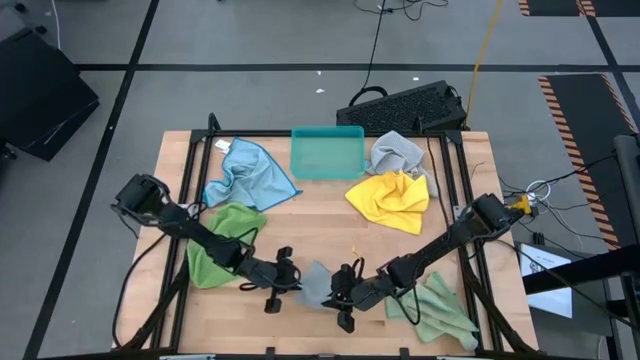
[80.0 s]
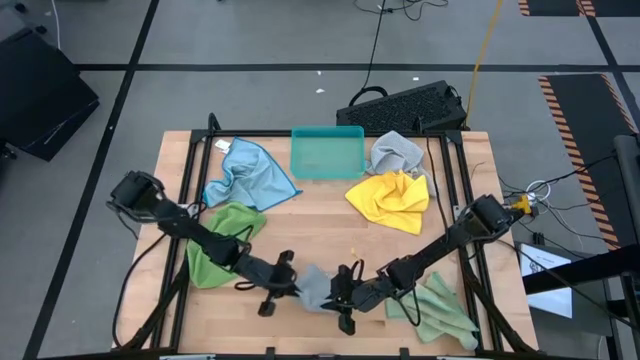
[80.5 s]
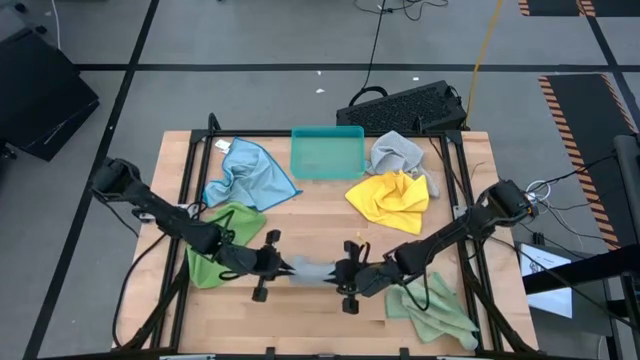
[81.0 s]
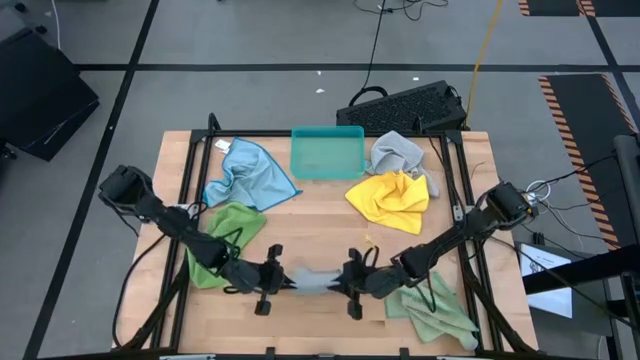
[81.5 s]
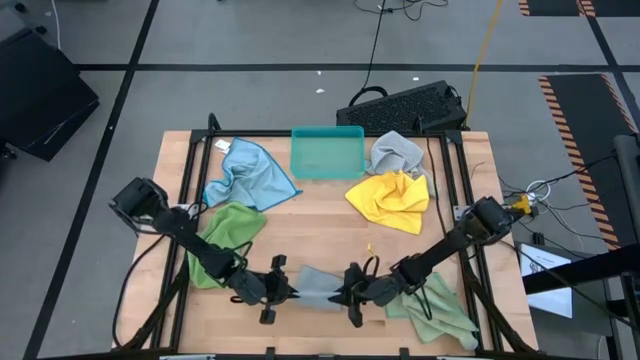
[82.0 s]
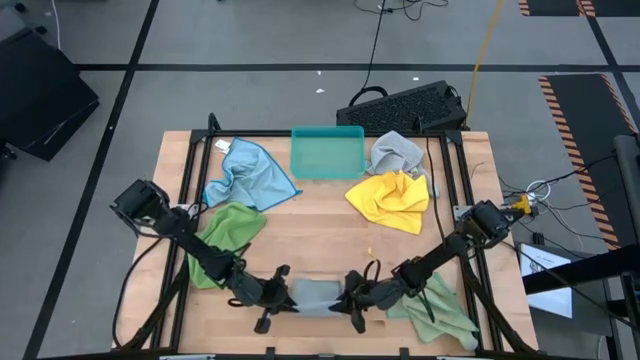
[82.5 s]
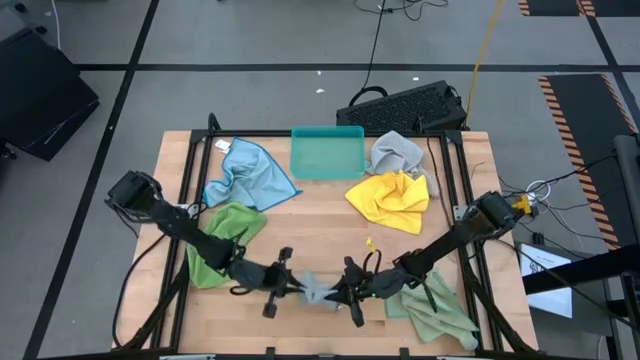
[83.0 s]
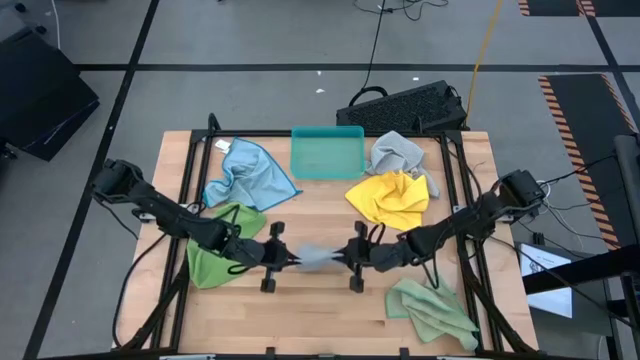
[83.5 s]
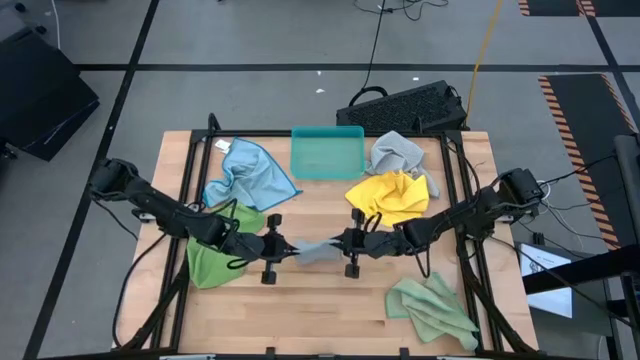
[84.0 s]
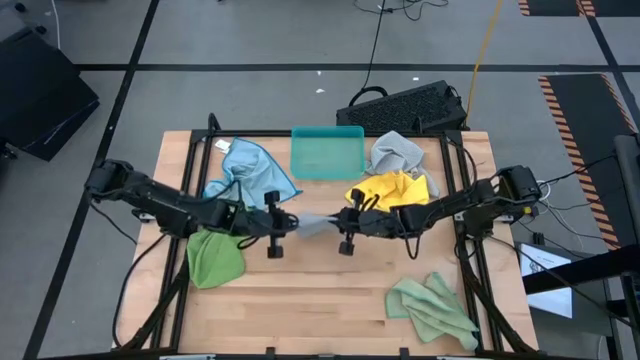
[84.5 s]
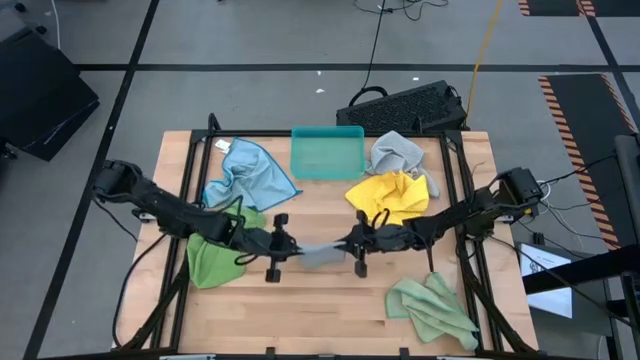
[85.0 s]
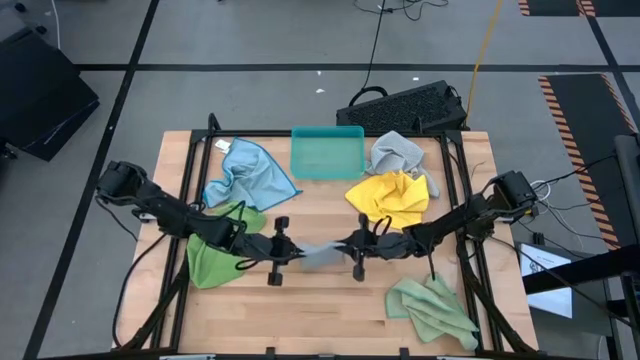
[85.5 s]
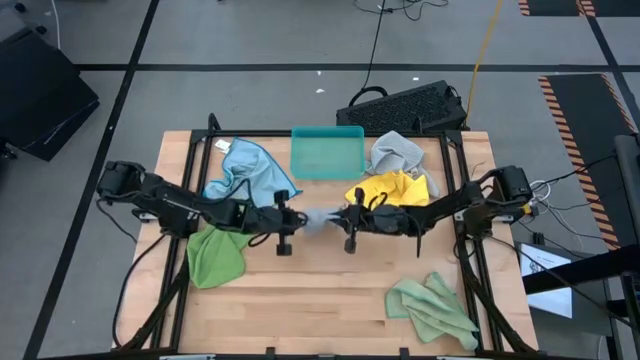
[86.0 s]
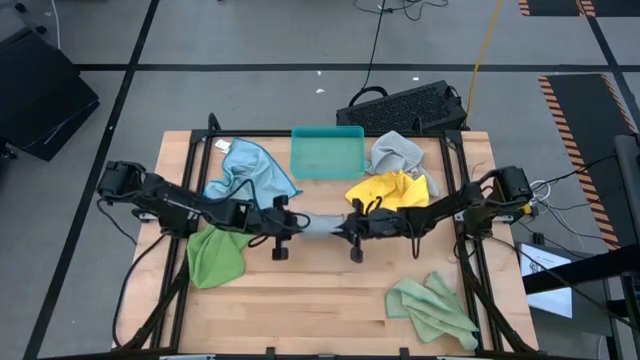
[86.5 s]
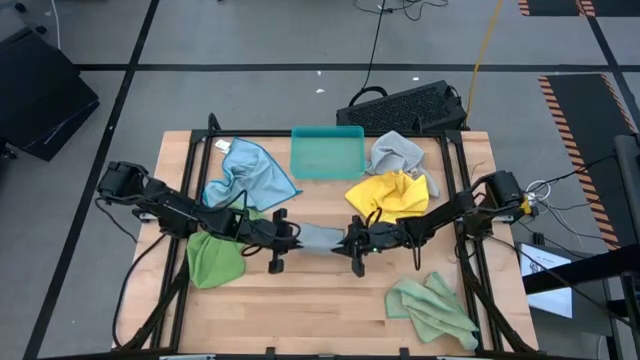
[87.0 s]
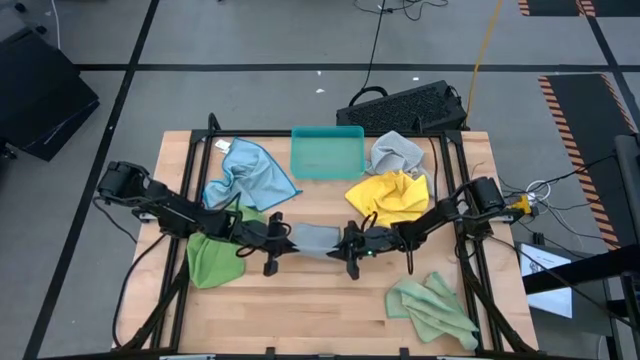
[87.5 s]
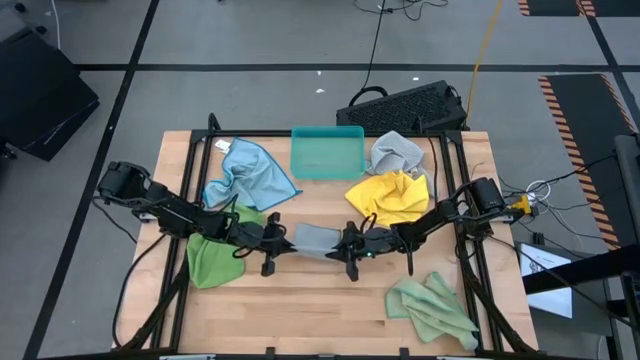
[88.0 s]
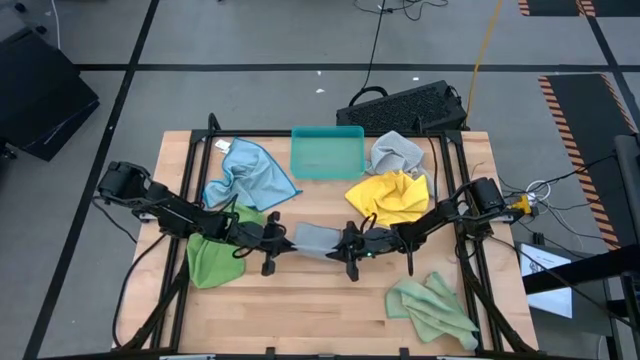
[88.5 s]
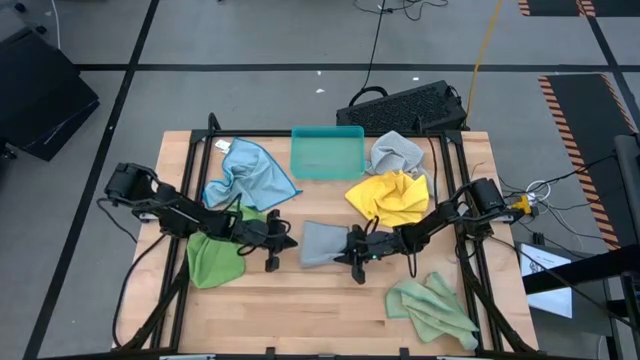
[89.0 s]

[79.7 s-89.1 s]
Task: Fold microfiber towels
Fold the dark gray microfiber towel

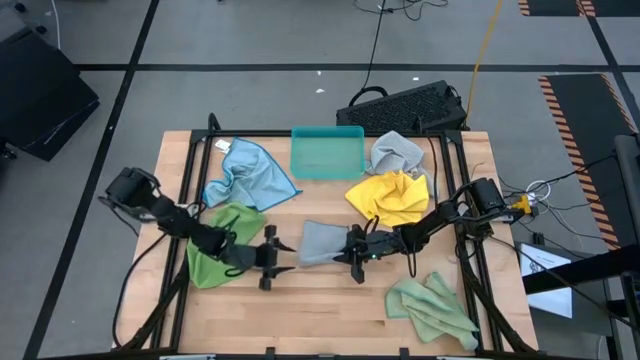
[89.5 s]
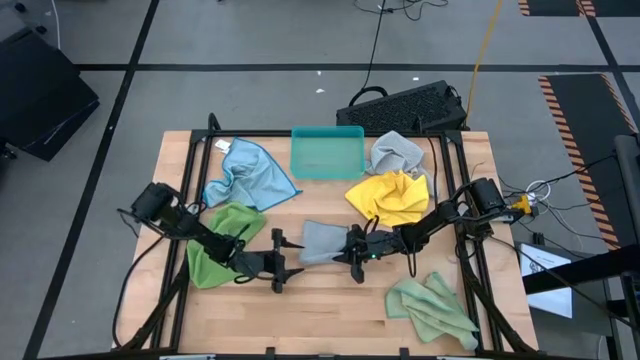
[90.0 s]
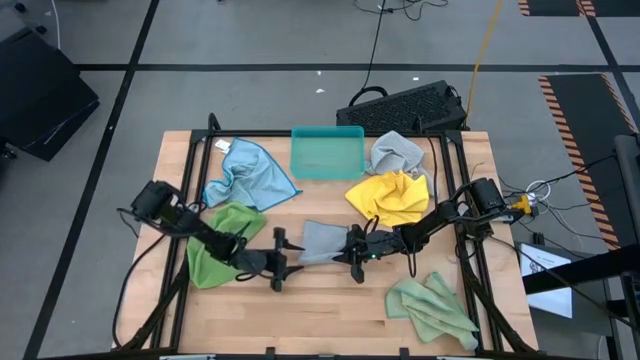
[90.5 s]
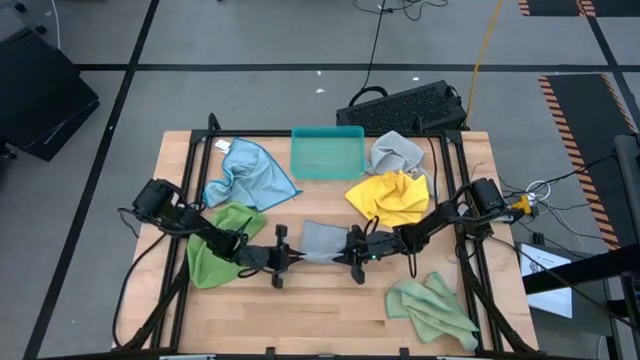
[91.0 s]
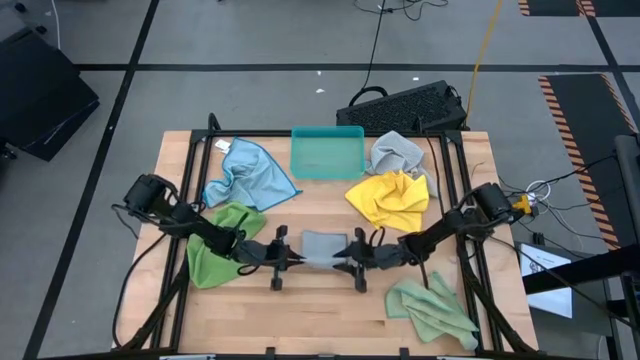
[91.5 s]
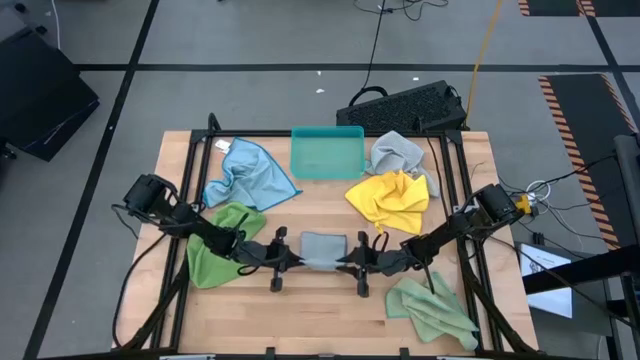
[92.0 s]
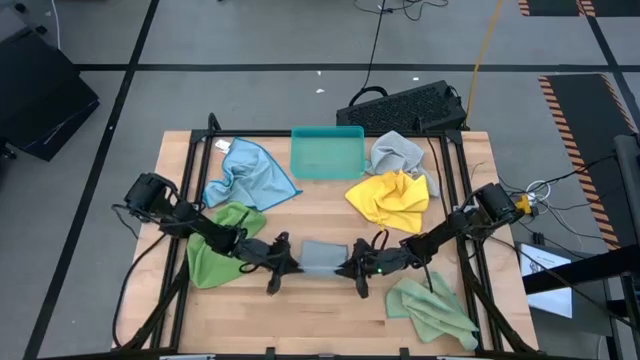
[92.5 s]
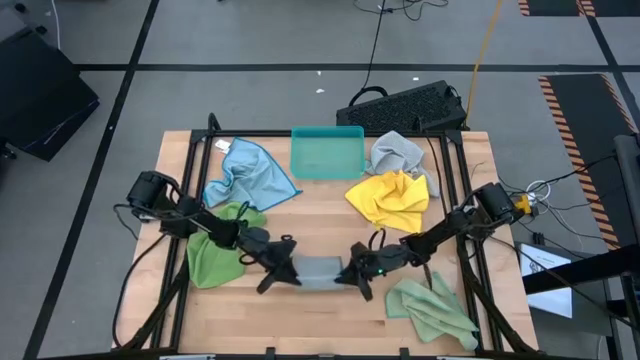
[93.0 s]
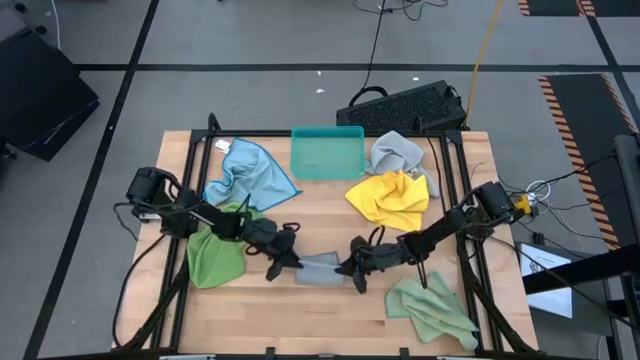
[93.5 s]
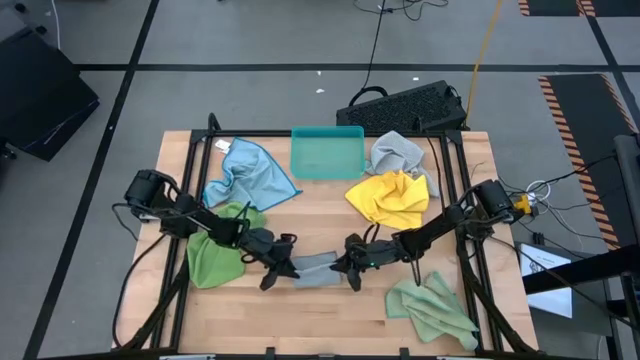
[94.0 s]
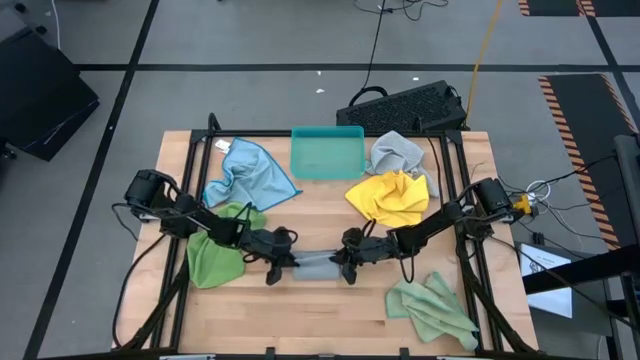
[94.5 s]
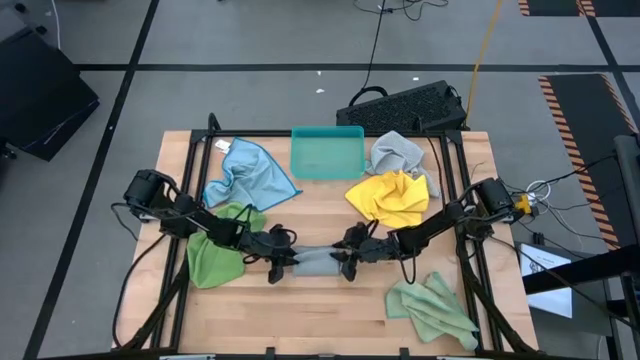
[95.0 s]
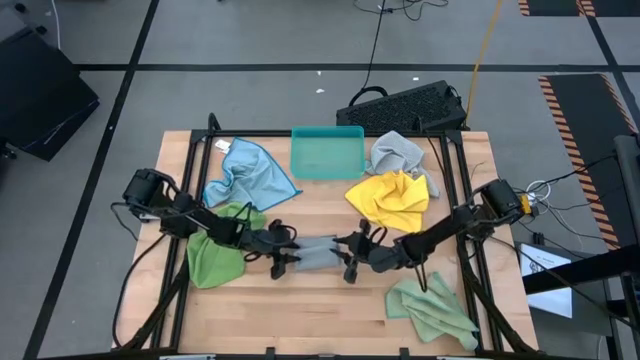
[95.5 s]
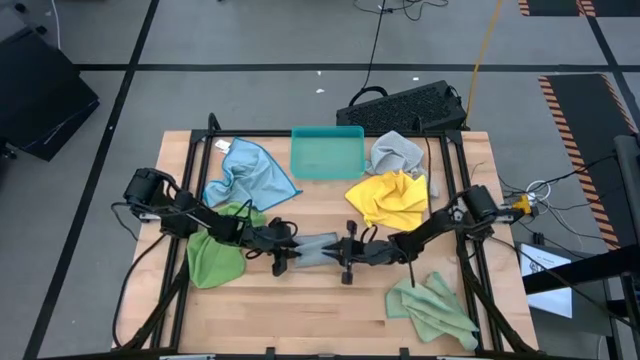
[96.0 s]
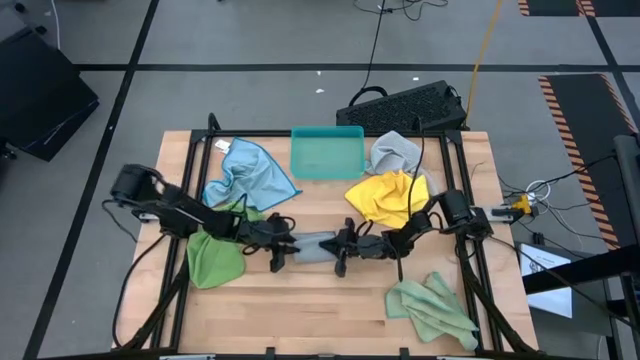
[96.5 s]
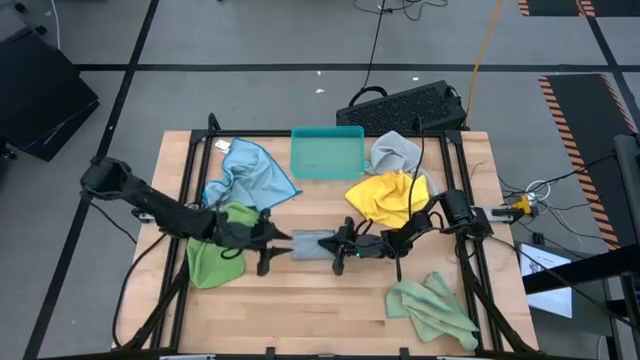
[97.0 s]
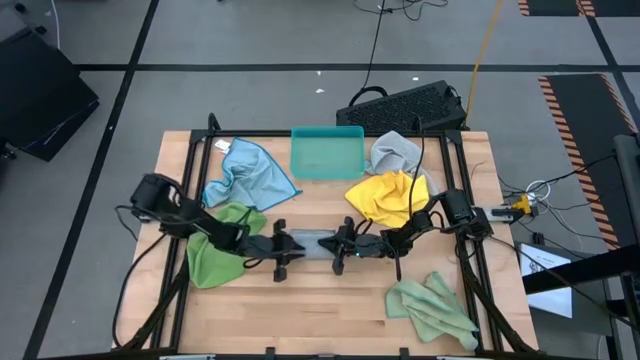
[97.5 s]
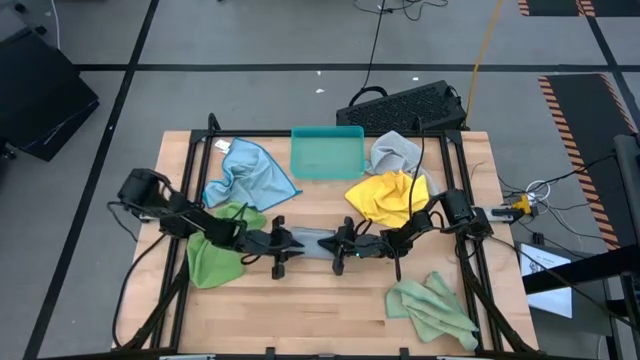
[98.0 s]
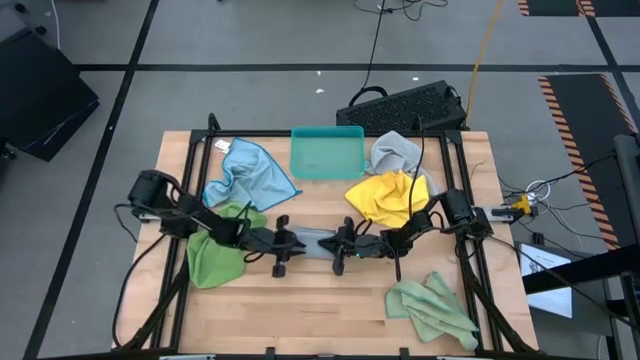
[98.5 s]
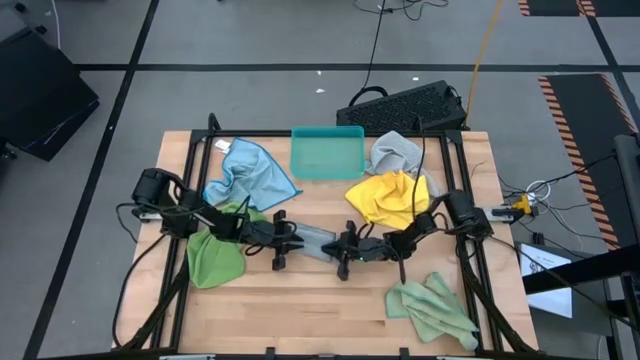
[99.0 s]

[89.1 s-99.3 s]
Fold the dark gray microfiber towel

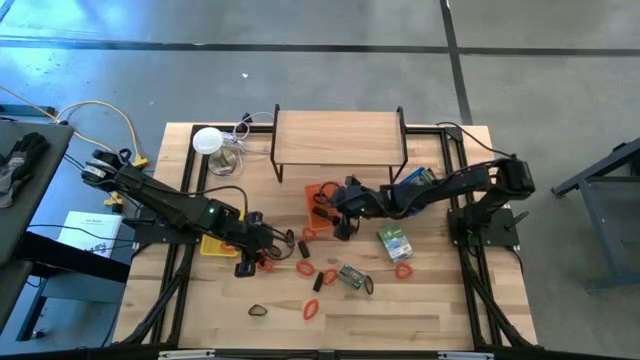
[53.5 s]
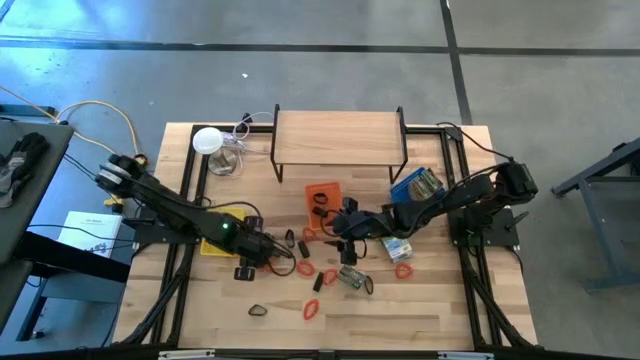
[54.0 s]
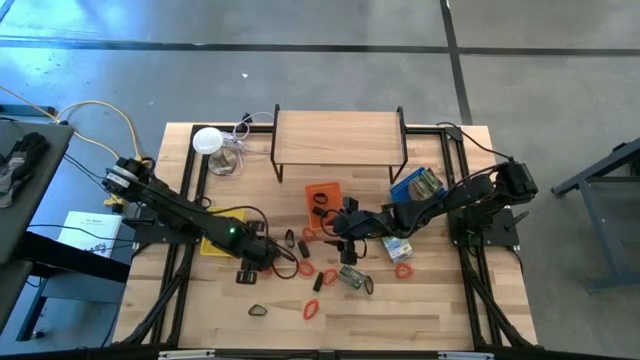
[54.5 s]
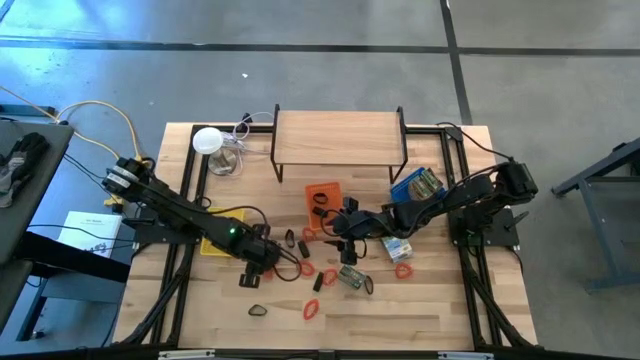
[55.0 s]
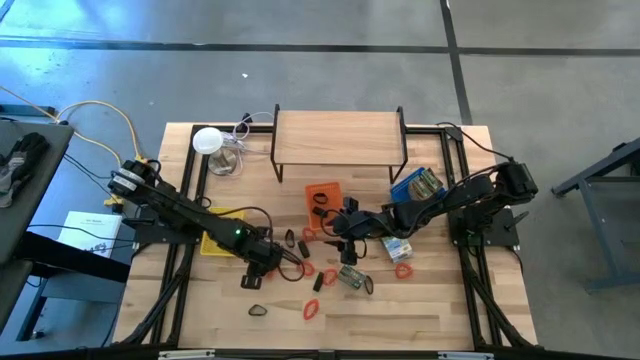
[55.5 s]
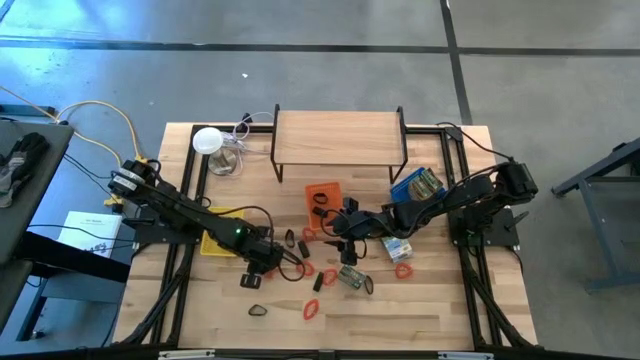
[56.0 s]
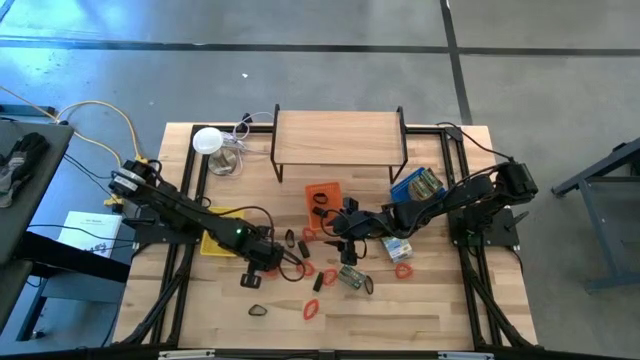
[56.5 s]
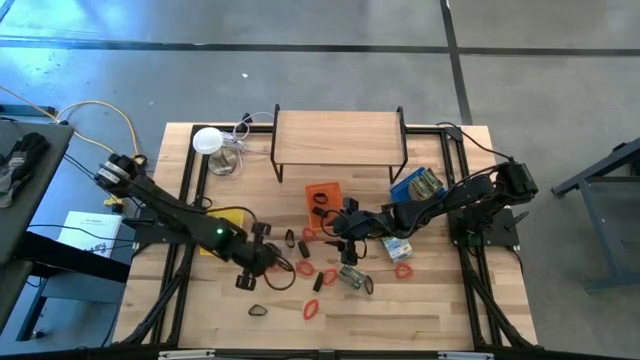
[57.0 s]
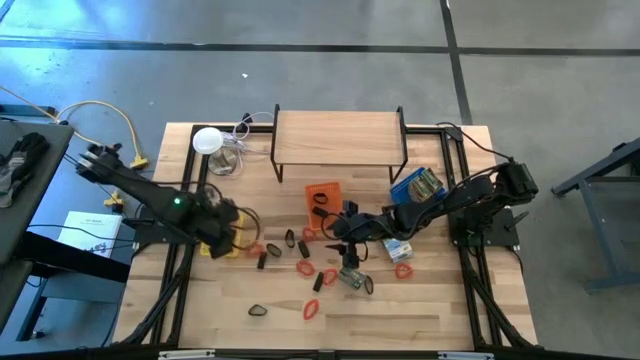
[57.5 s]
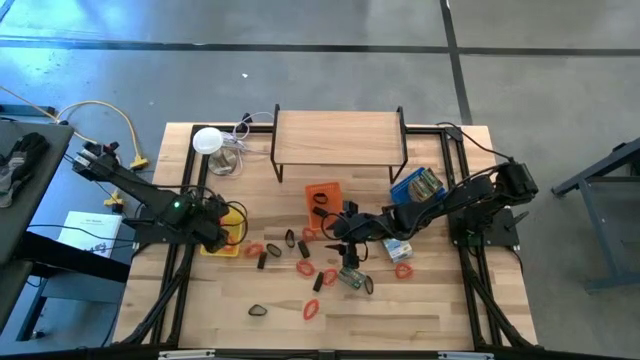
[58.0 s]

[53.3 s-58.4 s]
Task: Pick & Place Office Desk Supplies
Put the orange spring key chain into the yellow bin
